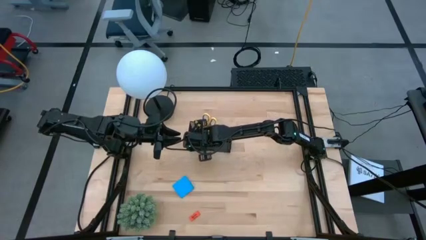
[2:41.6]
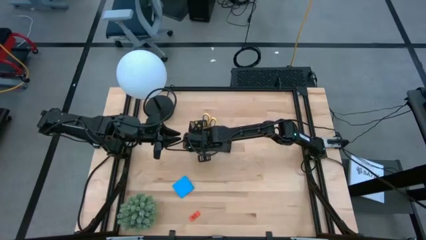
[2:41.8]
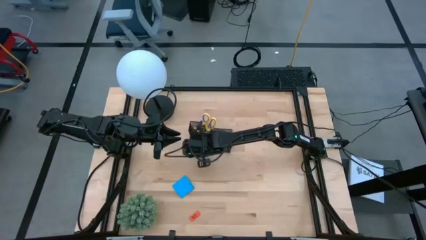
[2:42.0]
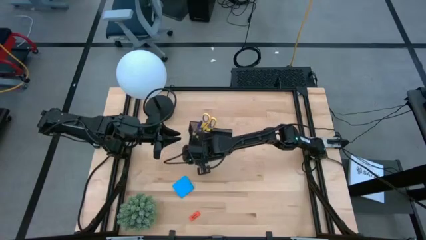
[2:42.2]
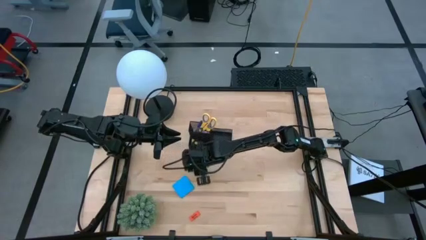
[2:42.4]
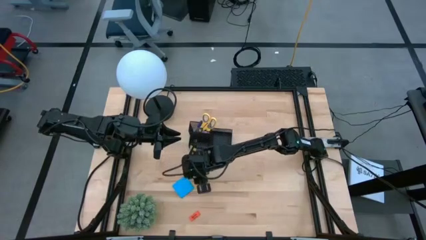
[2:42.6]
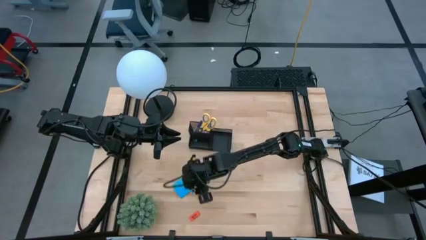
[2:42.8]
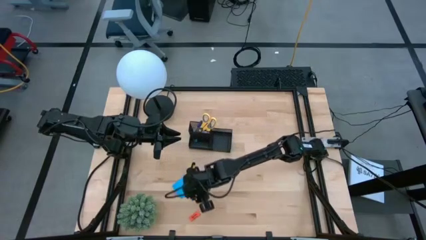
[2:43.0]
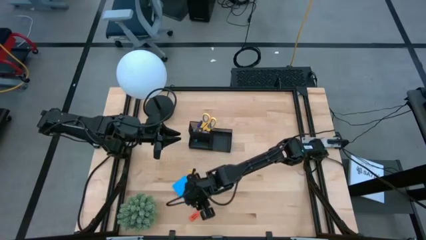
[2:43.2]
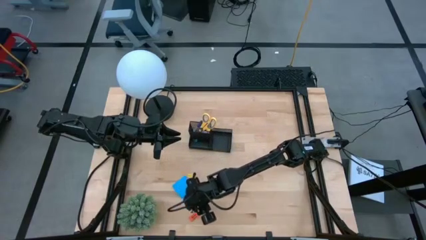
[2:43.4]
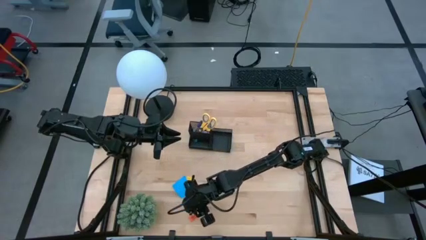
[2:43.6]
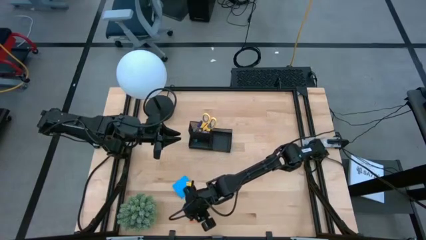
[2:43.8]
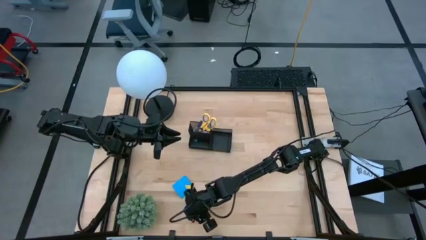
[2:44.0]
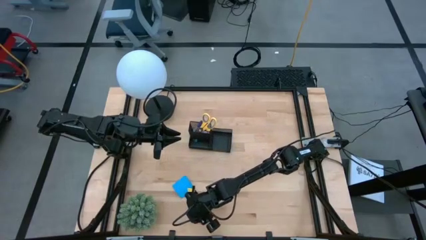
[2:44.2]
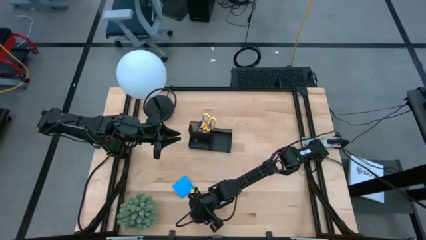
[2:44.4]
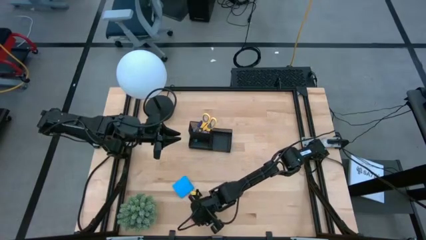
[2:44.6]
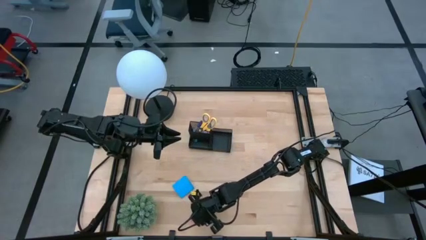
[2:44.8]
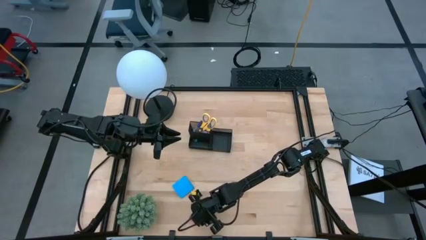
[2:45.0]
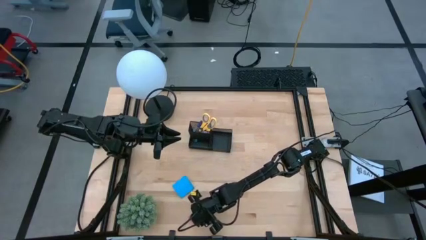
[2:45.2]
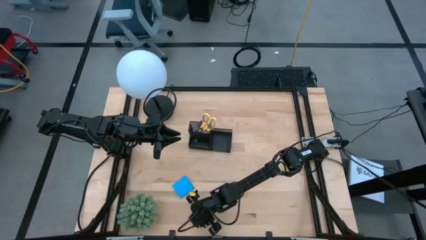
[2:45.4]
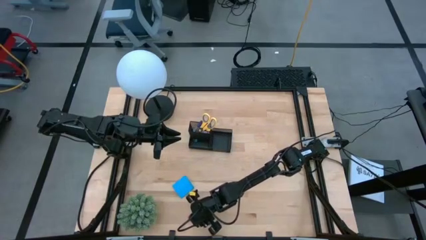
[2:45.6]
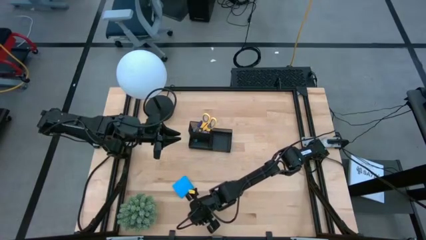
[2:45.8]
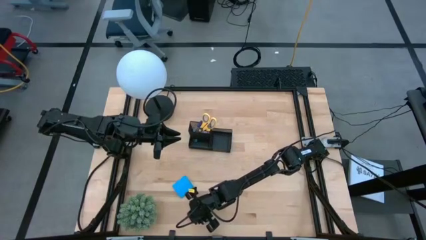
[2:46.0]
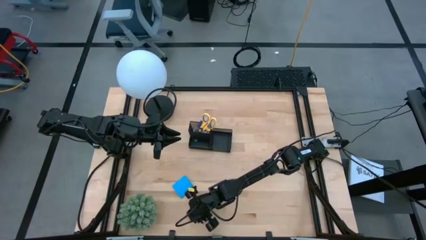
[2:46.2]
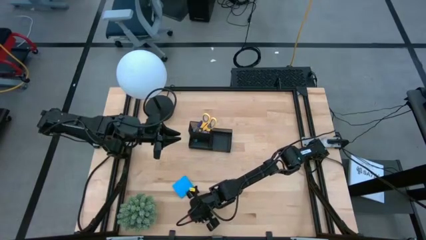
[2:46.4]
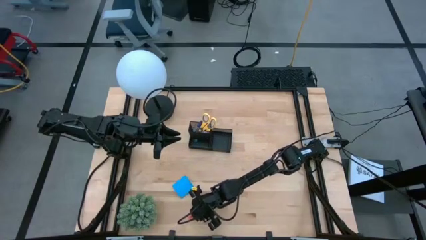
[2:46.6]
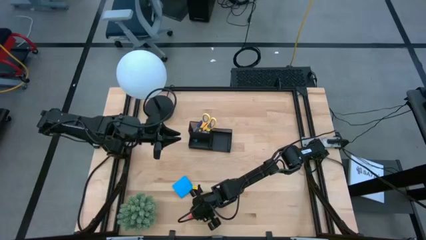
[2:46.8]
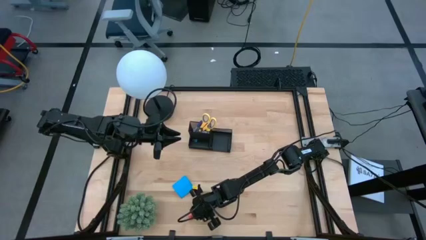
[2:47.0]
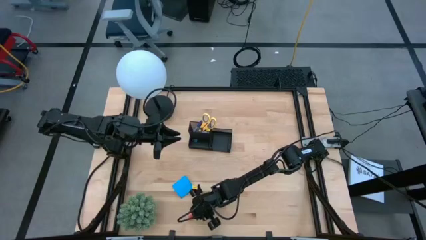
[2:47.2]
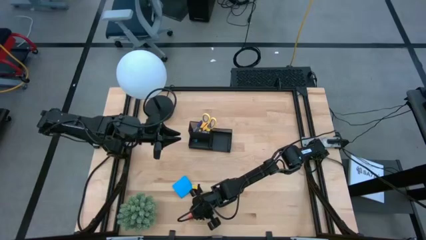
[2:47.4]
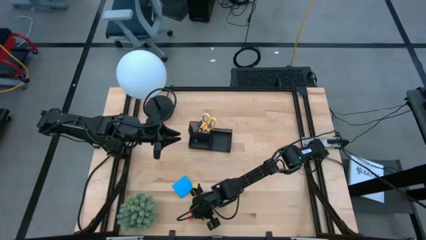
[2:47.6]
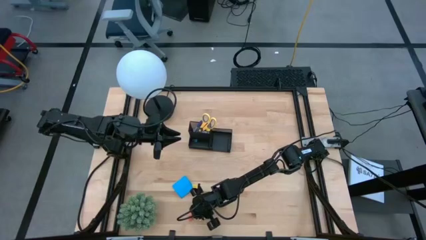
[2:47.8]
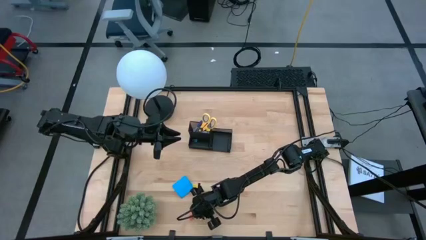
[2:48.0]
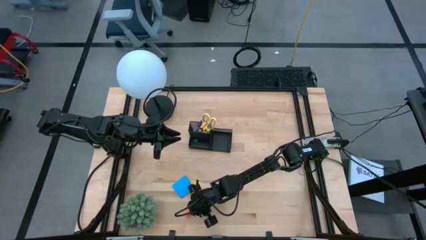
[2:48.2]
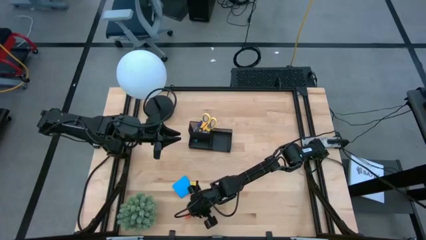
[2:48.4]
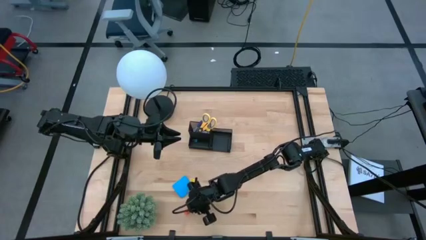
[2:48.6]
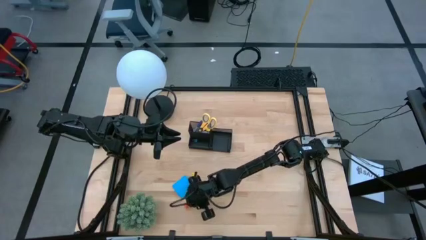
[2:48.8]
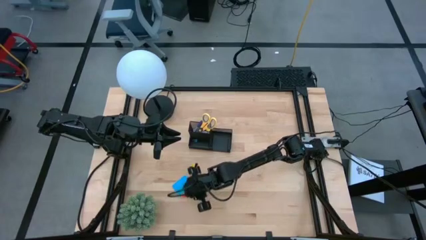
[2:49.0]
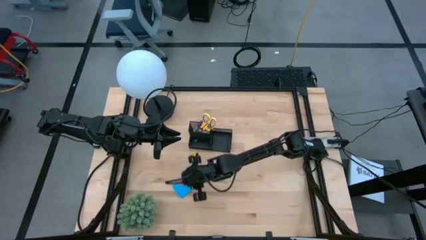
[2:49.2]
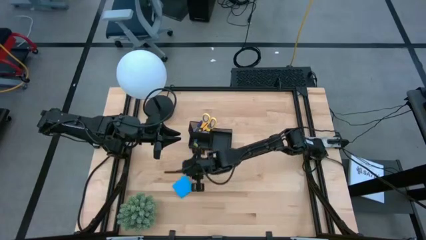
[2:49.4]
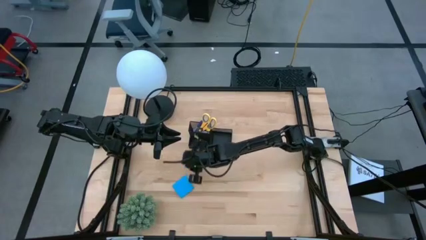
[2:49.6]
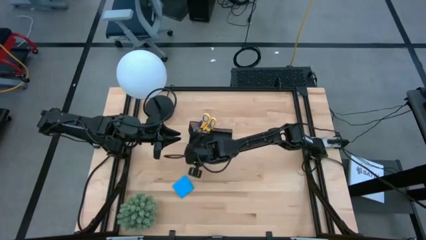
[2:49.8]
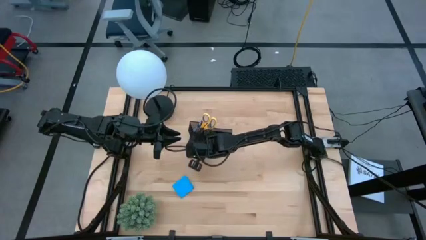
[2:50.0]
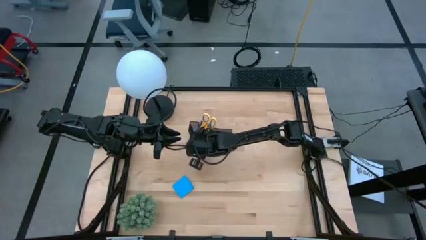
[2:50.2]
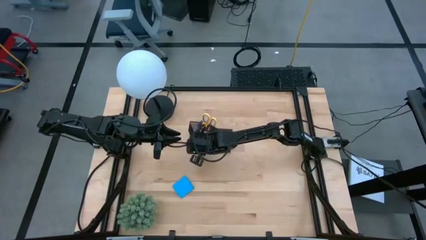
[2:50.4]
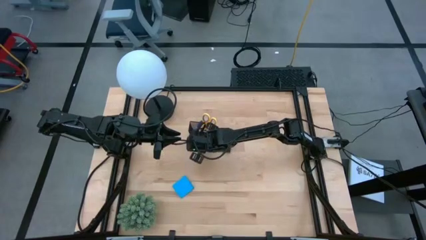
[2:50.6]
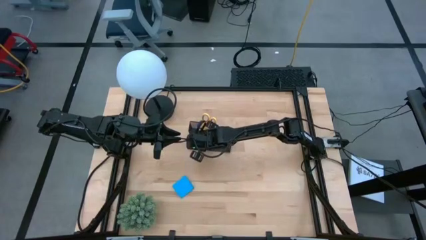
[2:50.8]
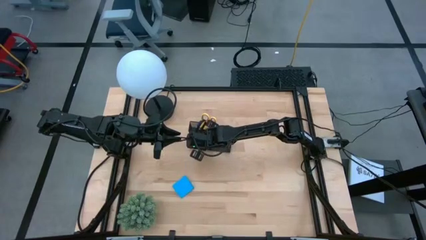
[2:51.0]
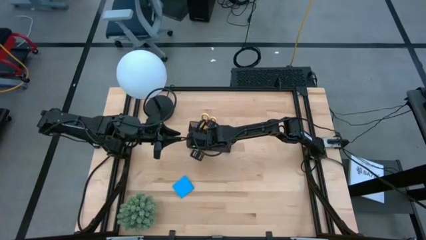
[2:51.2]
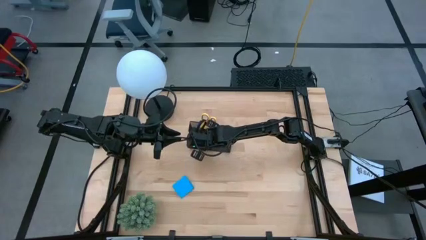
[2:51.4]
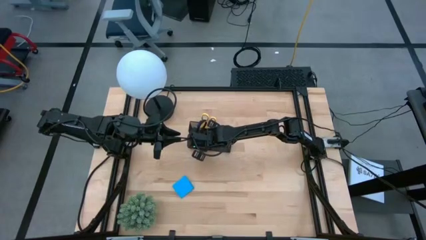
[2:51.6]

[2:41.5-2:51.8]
Task: Pick and place office supplies into organizer
Put the orange eraser into the black desk organizer

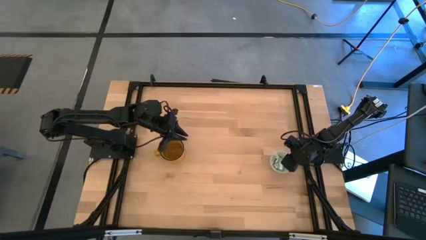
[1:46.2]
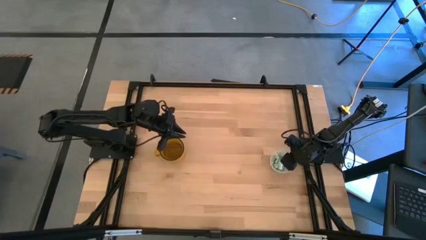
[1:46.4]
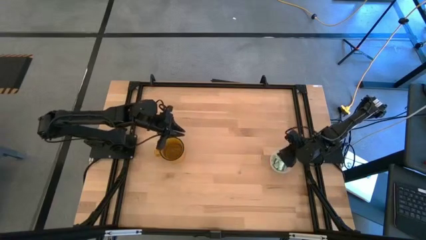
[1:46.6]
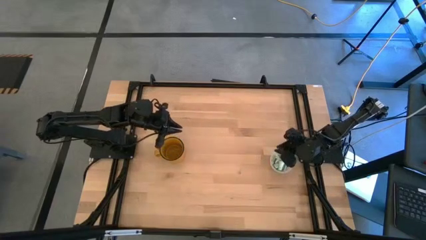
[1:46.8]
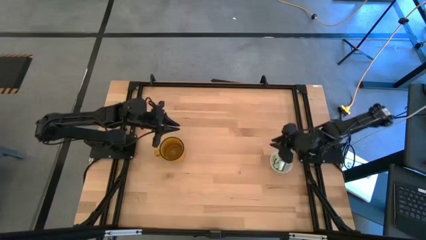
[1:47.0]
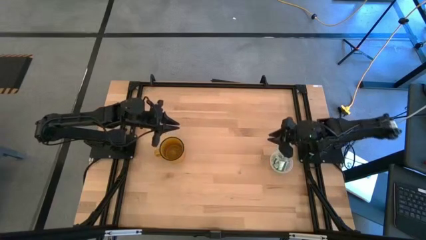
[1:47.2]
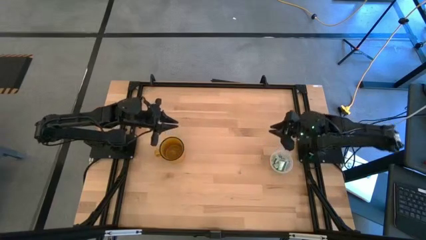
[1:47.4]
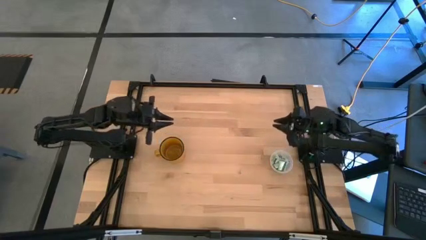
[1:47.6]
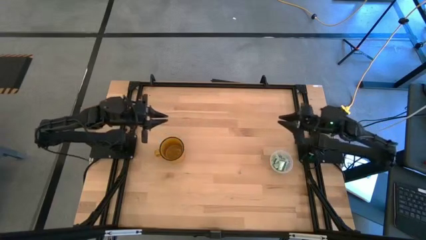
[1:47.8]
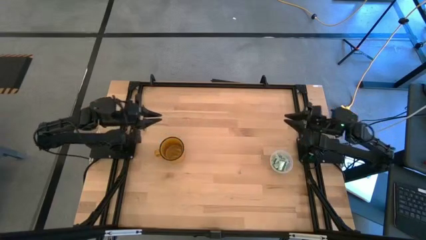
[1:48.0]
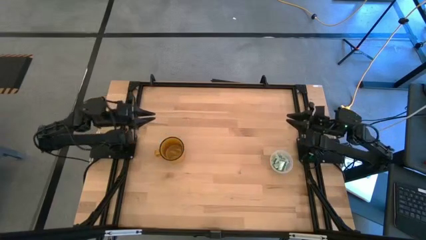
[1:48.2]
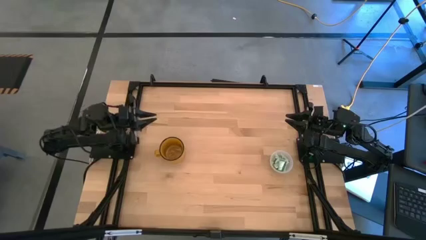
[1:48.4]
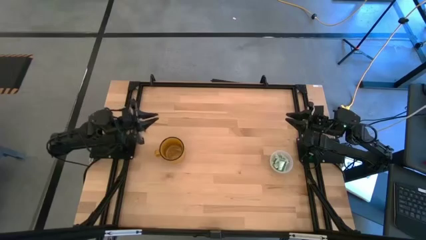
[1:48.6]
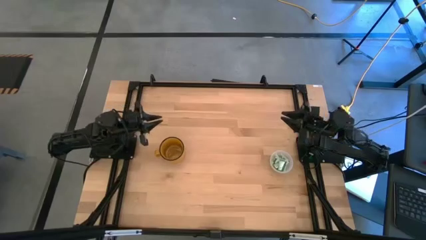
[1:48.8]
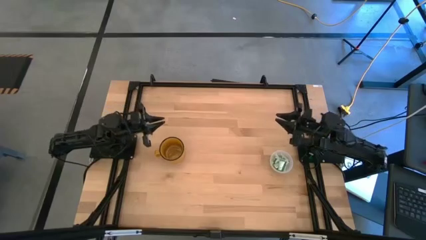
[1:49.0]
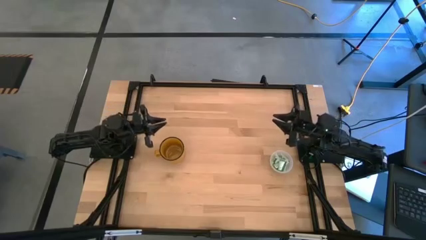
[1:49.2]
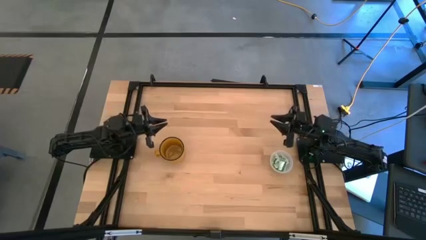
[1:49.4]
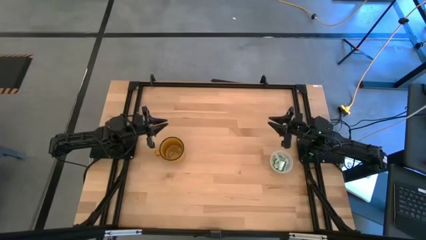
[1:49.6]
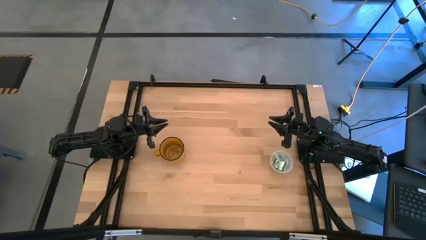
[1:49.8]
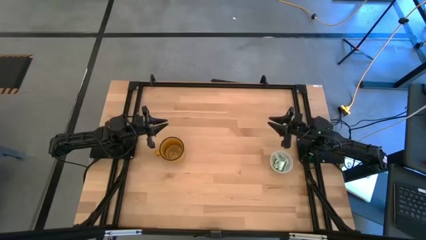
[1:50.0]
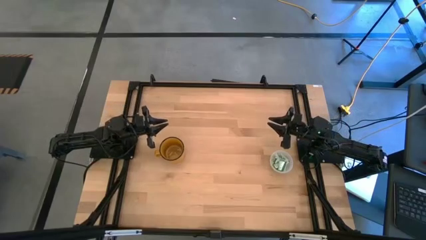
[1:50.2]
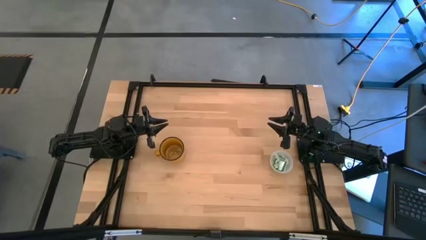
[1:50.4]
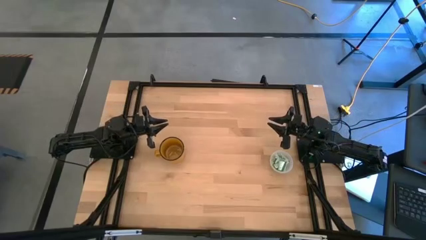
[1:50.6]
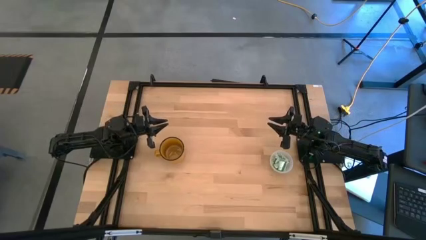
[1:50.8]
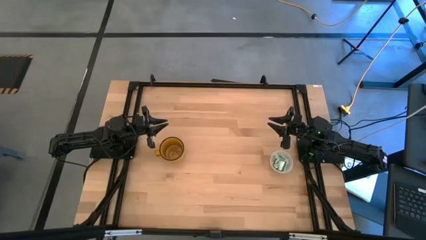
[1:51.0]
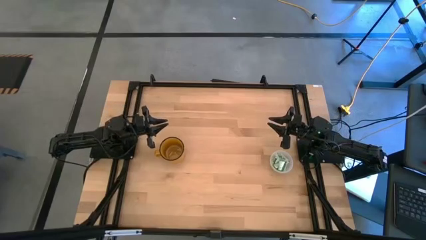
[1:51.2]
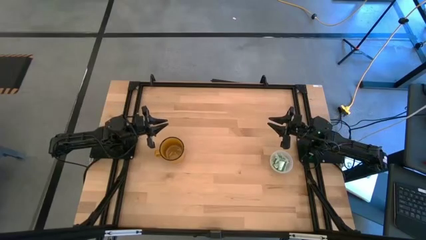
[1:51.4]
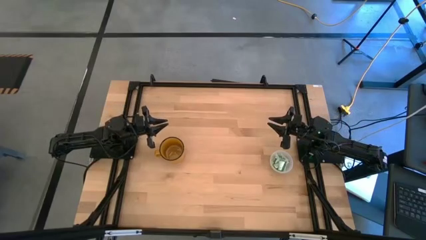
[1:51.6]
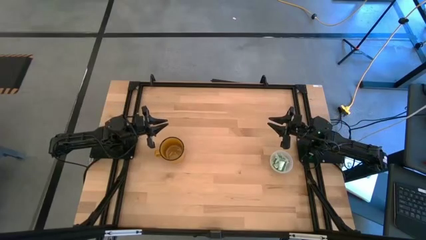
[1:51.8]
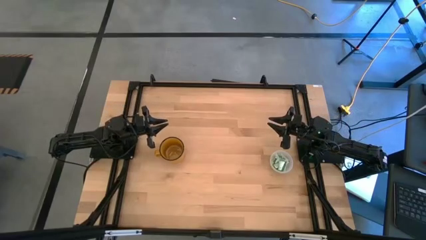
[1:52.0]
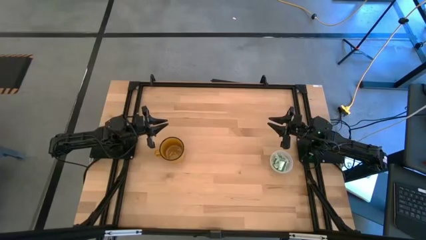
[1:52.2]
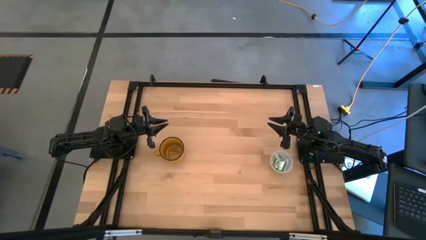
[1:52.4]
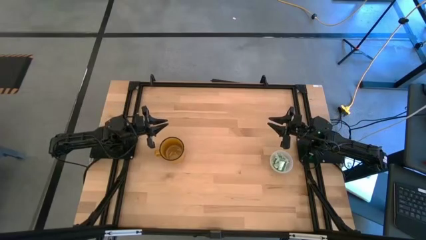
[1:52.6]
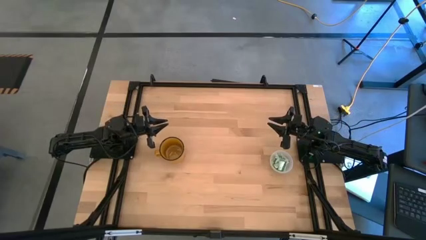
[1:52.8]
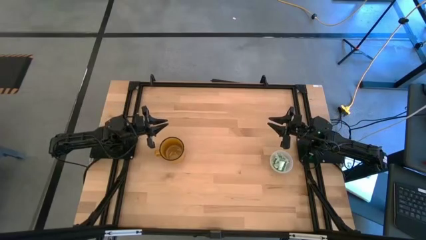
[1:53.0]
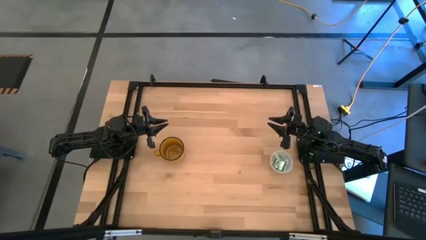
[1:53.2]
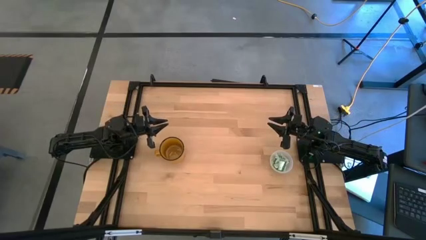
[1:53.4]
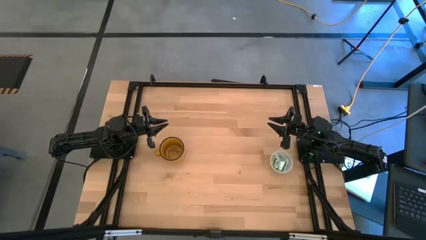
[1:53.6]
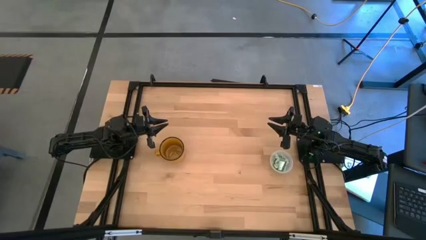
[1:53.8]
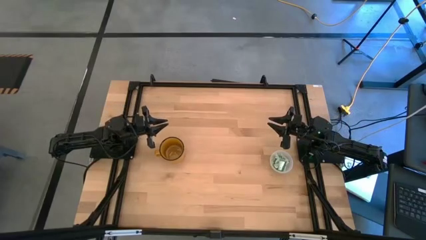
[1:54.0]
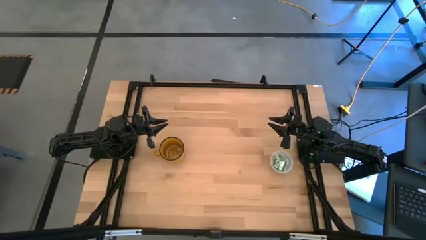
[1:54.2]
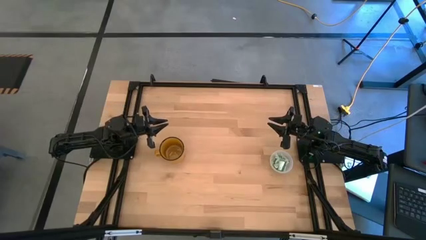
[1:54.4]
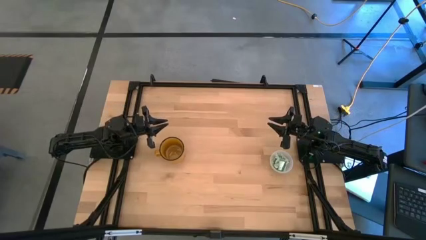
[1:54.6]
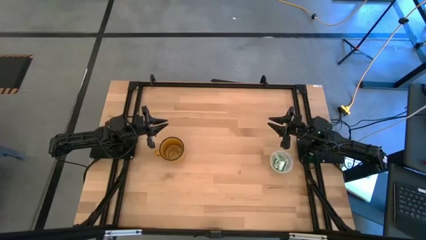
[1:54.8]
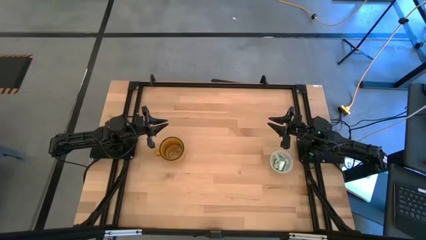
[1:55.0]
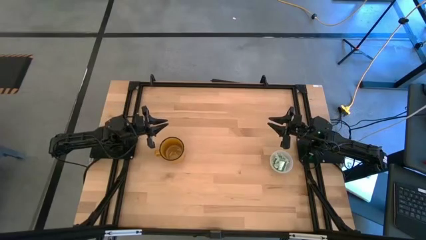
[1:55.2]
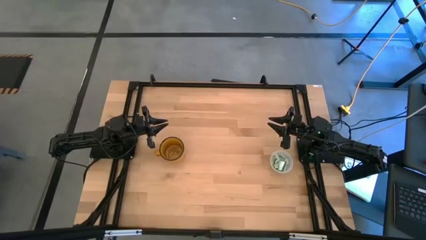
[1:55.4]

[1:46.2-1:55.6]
Task: Pick and place Stevia / Truvia into bins
Return to Home Position
